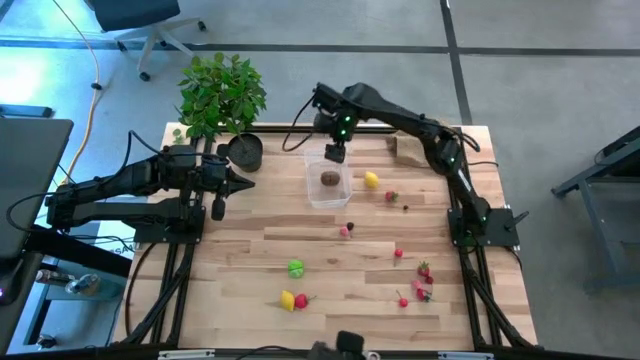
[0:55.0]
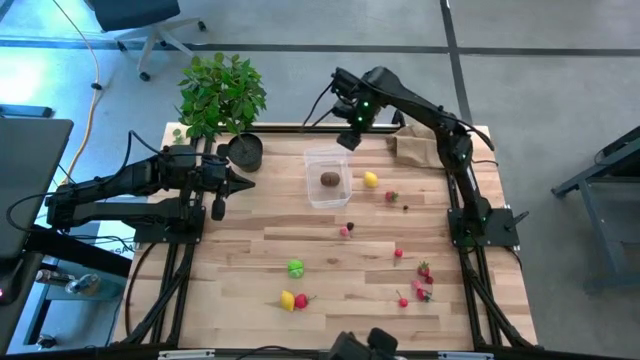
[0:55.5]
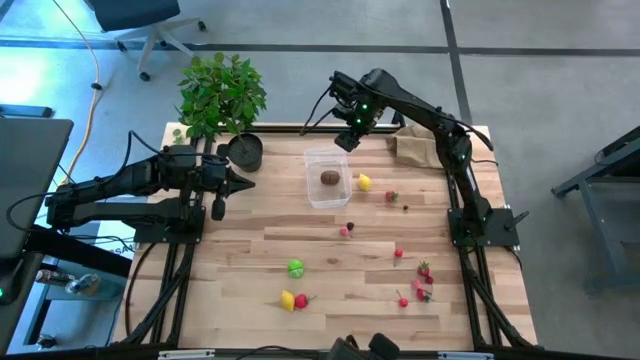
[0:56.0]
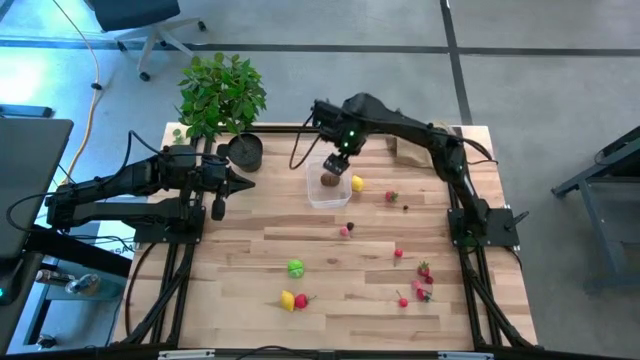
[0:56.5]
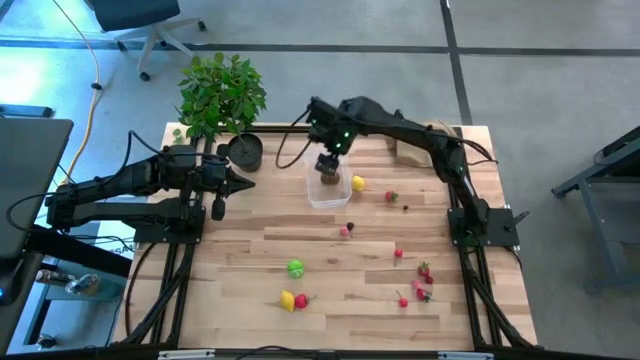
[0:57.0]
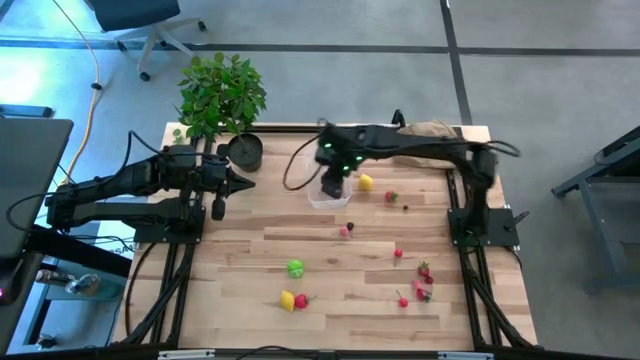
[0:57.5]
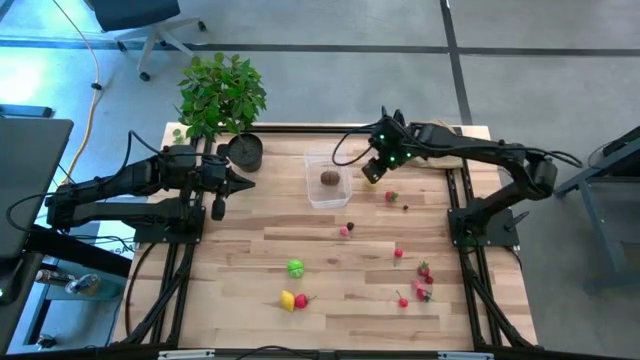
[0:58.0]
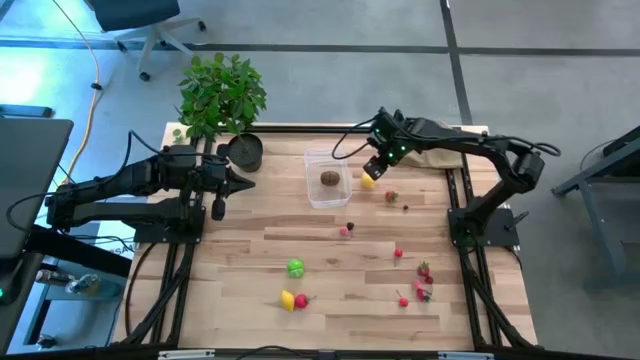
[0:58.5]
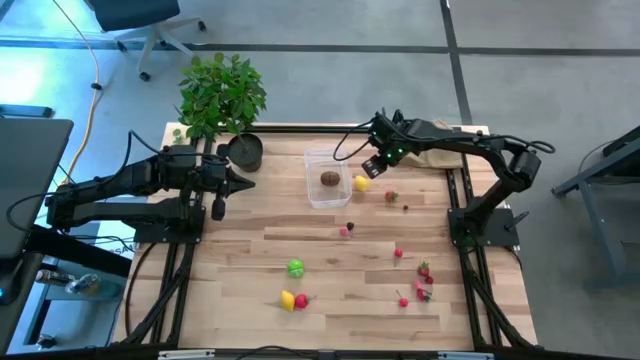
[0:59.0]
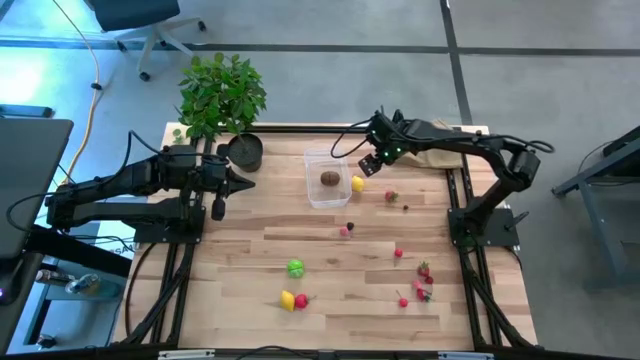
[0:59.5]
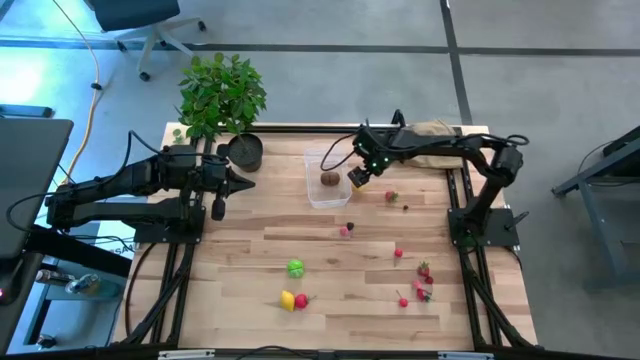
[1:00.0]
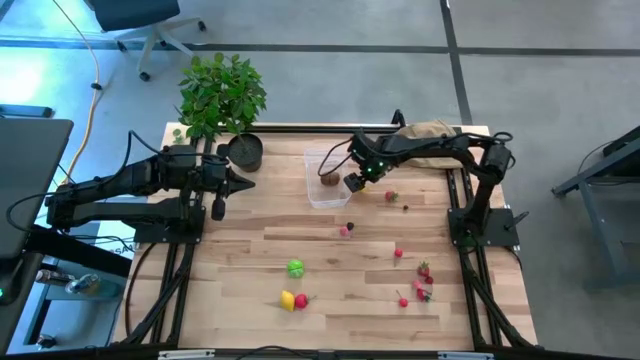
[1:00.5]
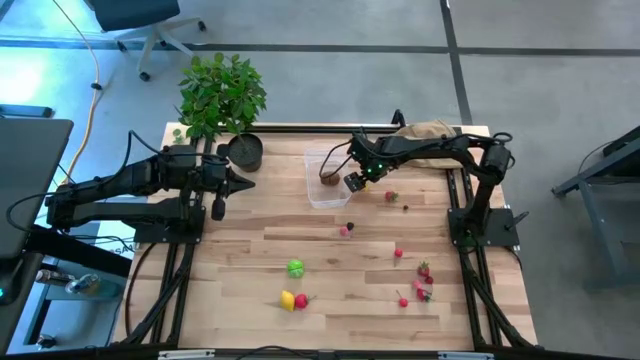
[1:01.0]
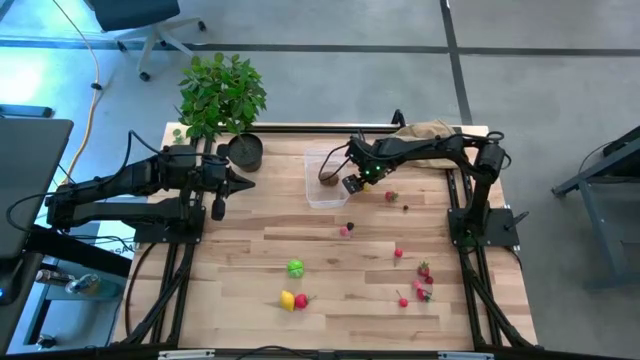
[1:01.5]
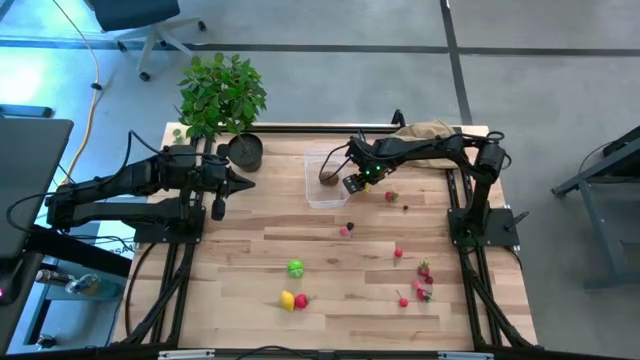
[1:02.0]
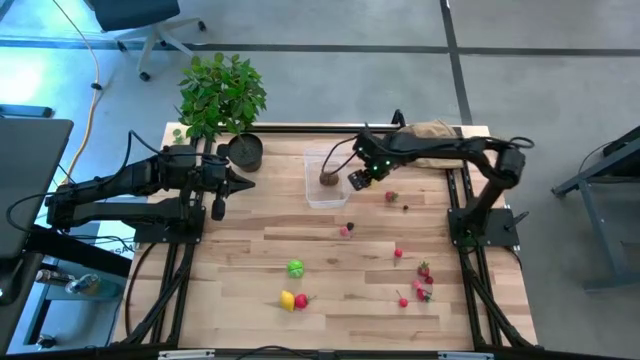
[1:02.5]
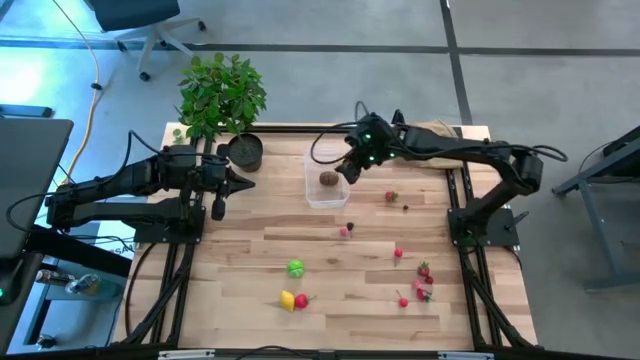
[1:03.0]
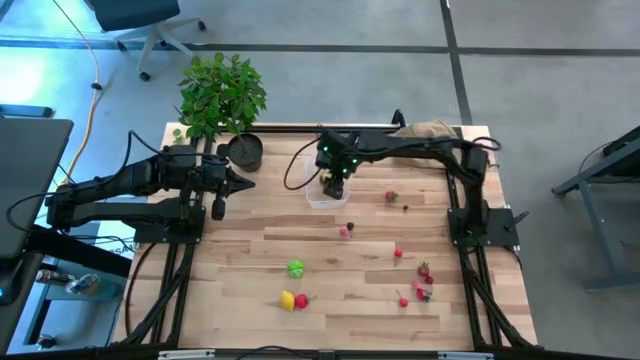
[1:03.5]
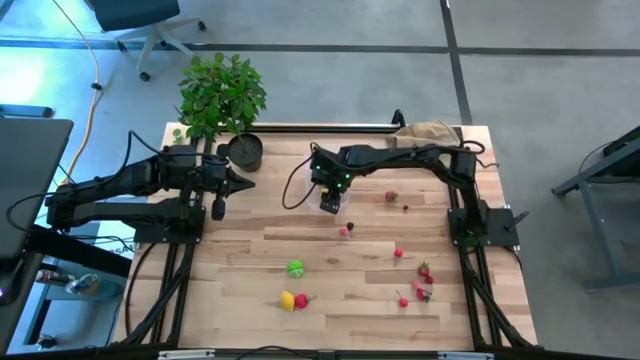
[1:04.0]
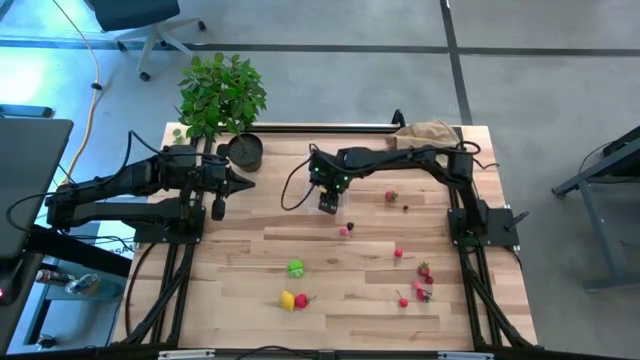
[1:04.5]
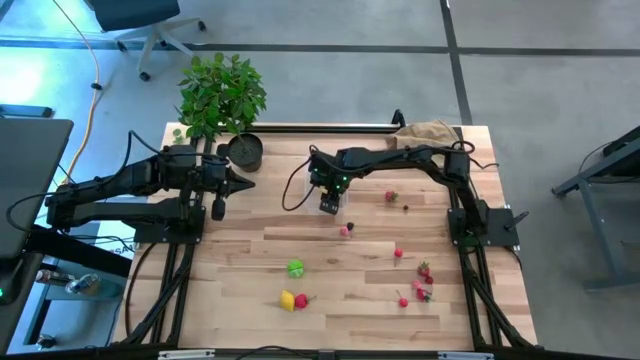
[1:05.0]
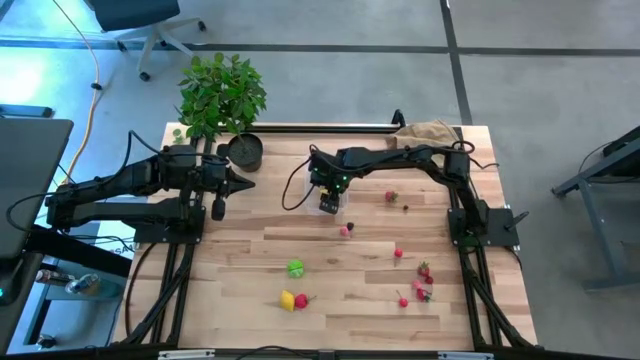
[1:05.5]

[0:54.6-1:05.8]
Task: Pick and placing Produce into tupperware
Put the top yellow lemon into the transparent bin

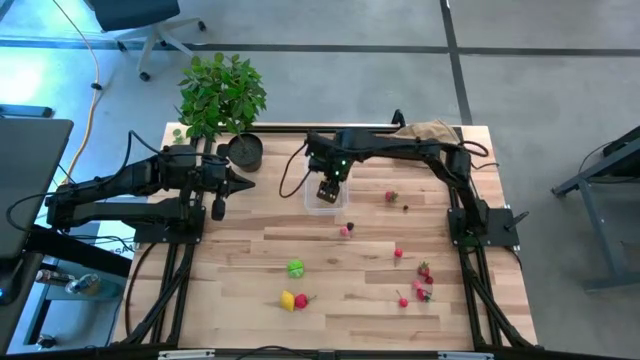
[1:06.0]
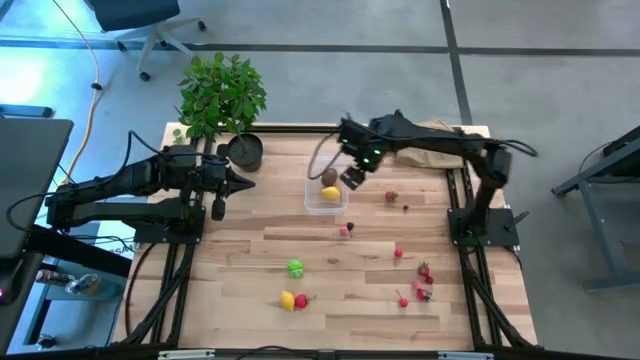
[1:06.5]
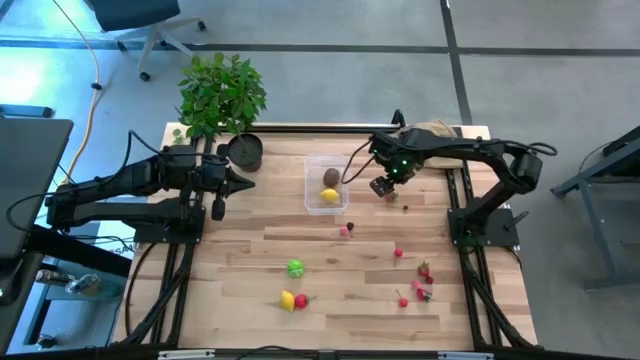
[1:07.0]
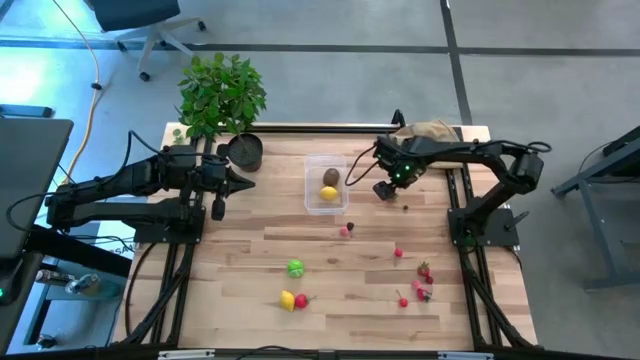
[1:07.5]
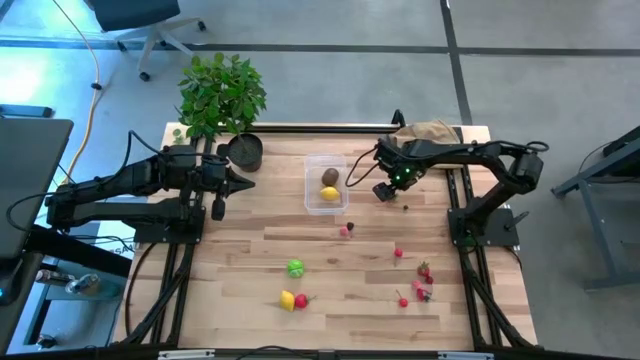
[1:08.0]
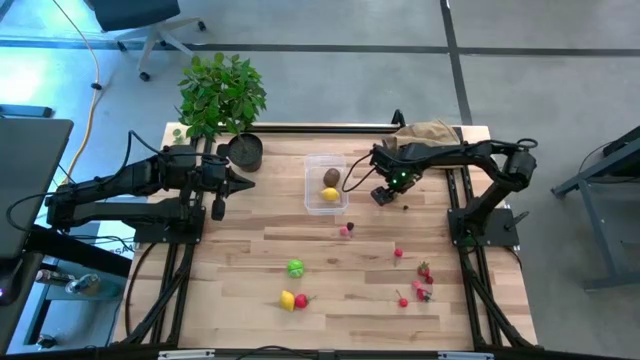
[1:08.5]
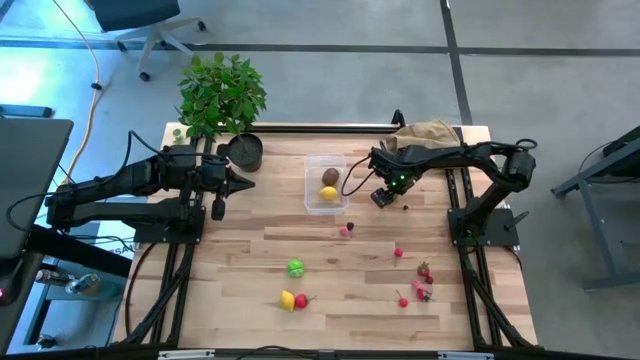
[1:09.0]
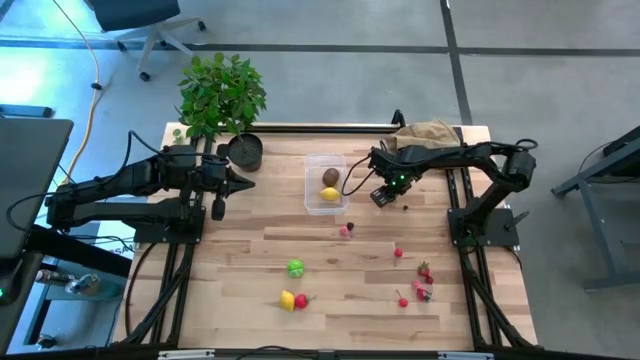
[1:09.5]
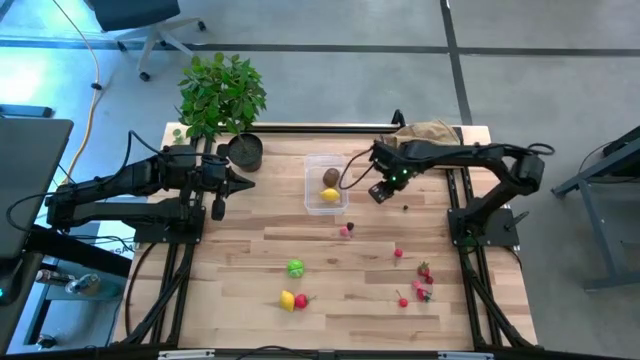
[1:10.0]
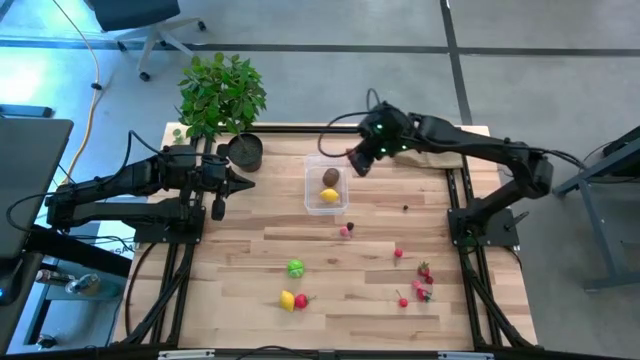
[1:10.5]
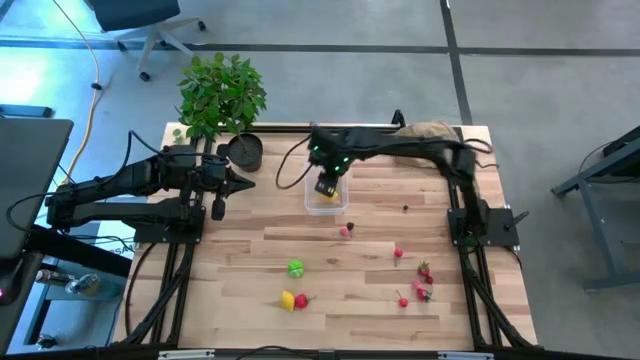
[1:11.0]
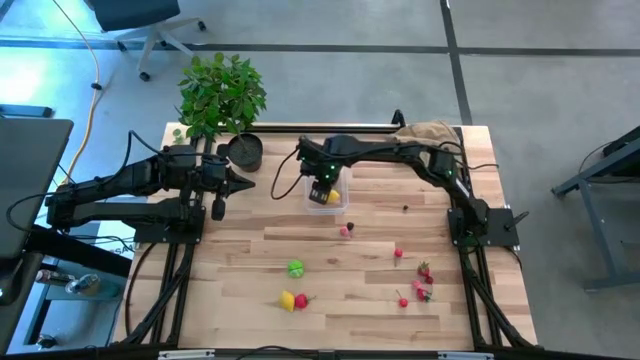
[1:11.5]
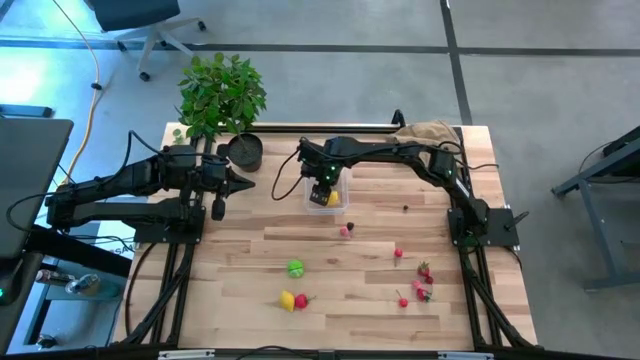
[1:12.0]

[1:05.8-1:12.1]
Put the top red strawberry into the transparent bin

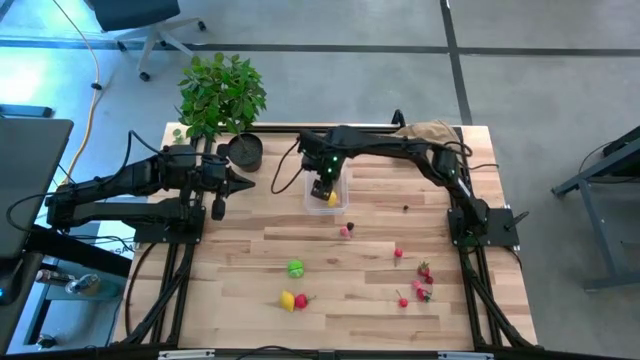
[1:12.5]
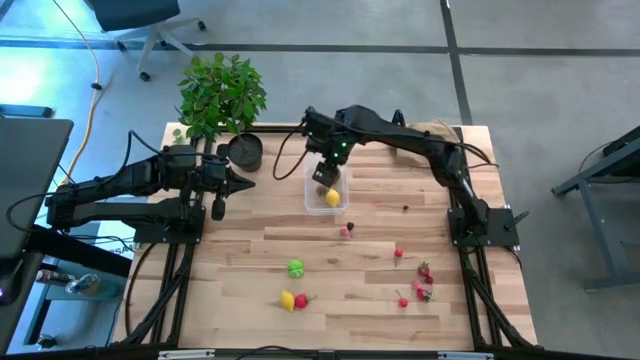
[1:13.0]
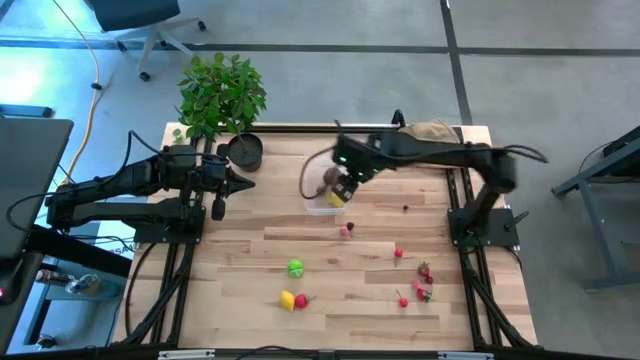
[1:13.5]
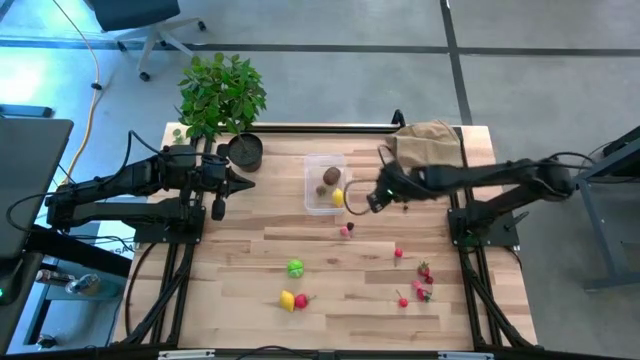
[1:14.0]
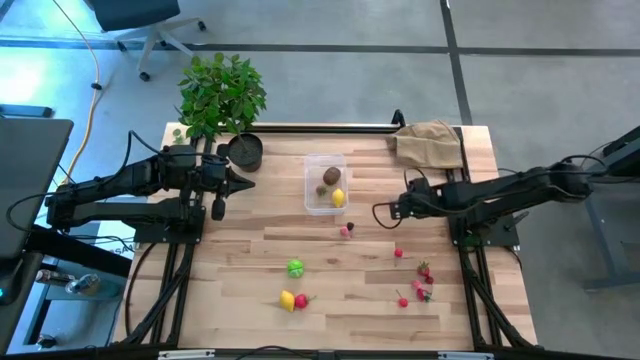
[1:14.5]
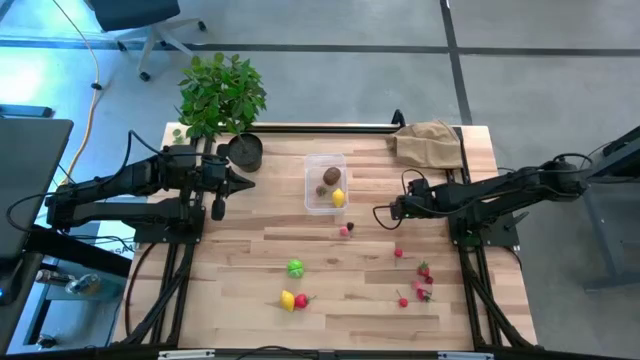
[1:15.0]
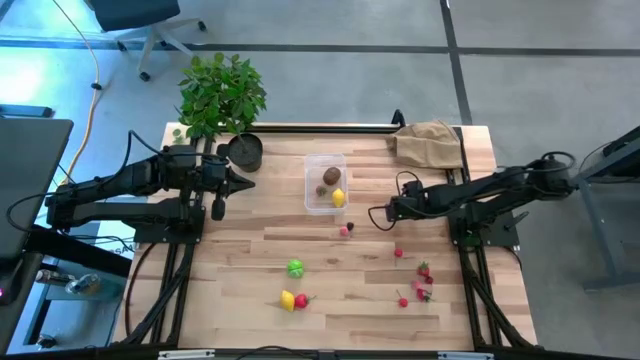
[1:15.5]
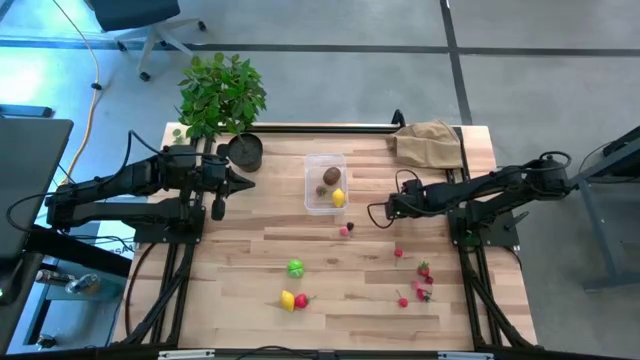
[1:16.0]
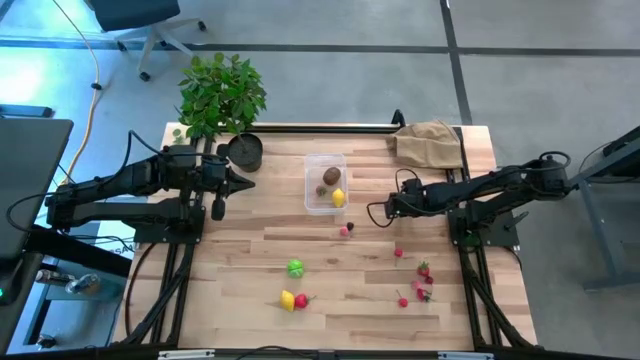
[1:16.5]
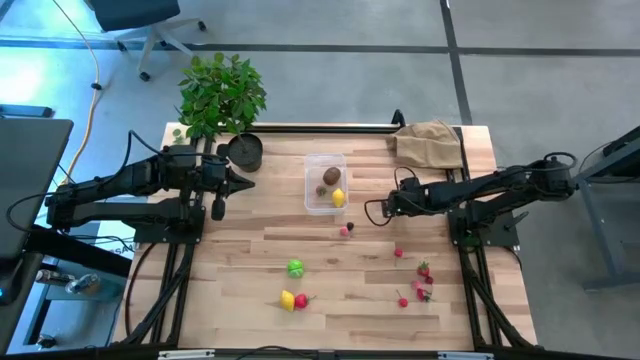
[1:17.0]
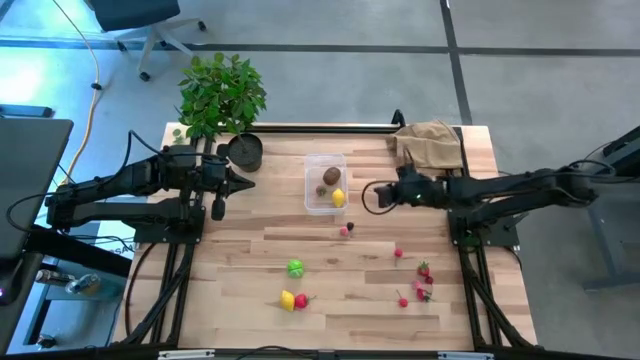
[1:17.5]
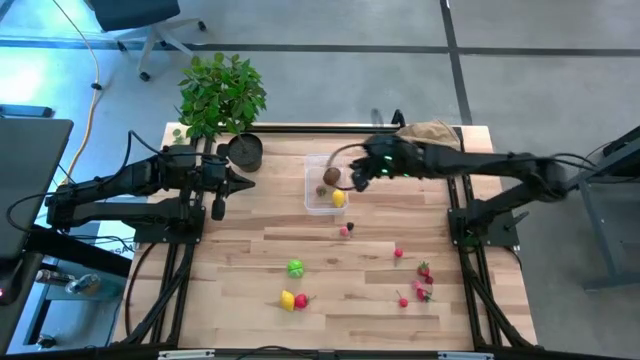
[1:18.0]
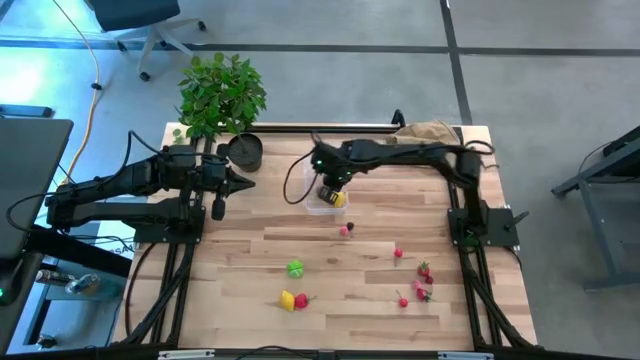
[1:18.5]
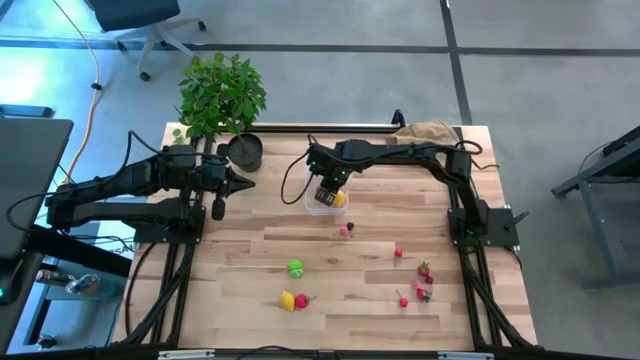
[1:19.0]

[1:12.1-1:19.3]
Put the blueberry into the transparent bin
